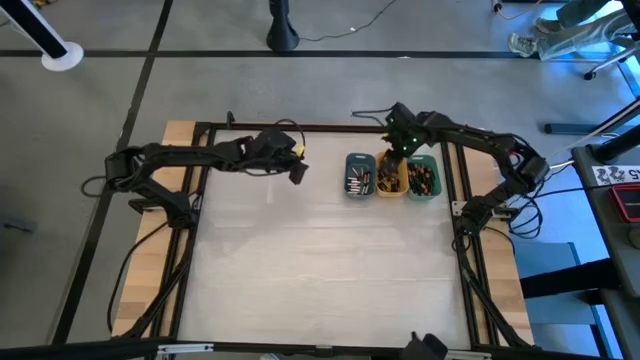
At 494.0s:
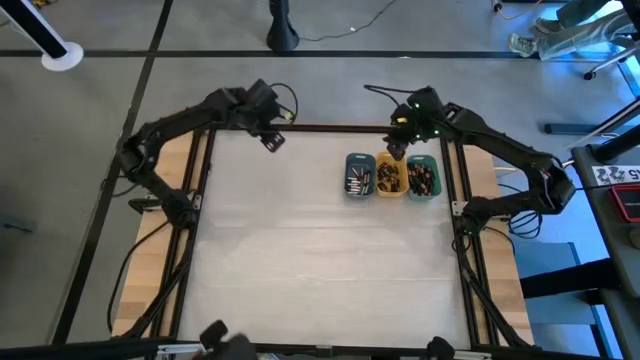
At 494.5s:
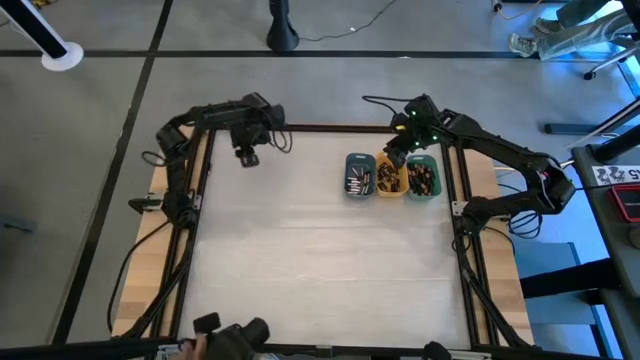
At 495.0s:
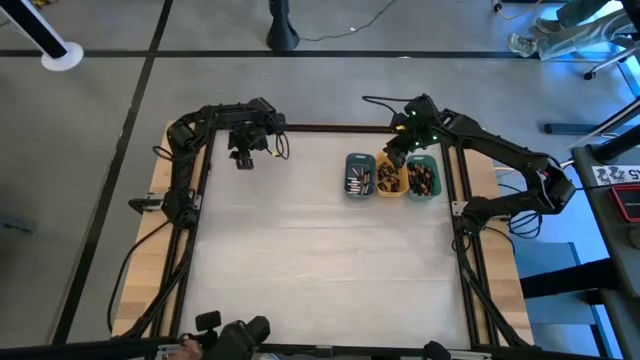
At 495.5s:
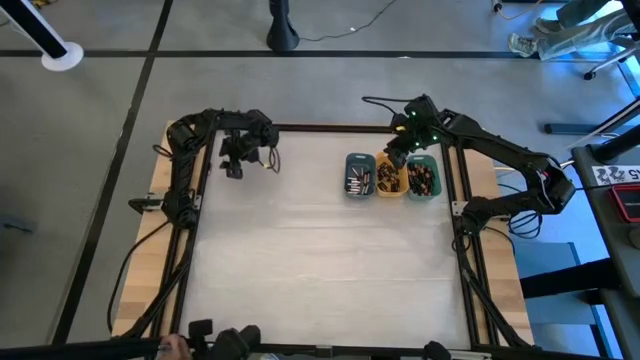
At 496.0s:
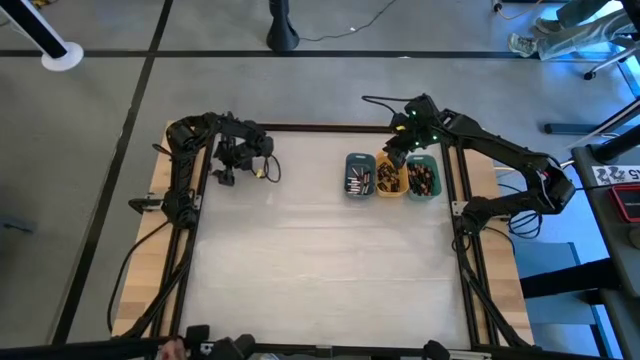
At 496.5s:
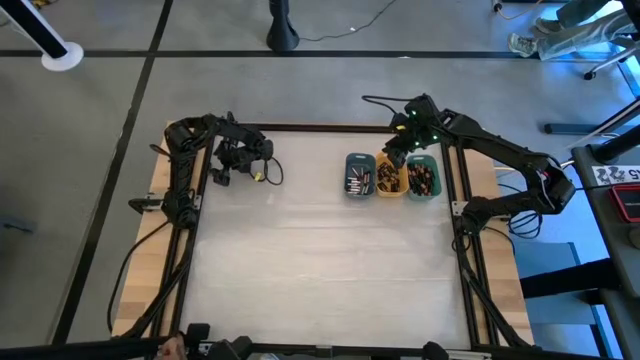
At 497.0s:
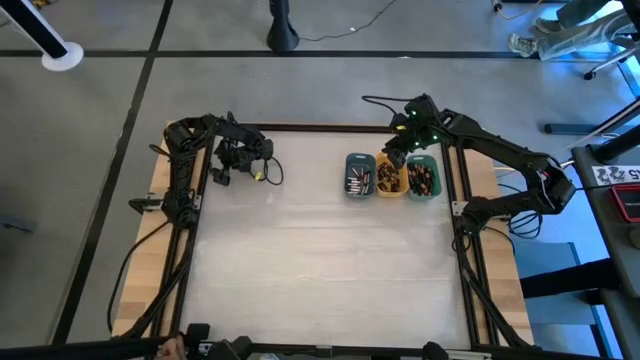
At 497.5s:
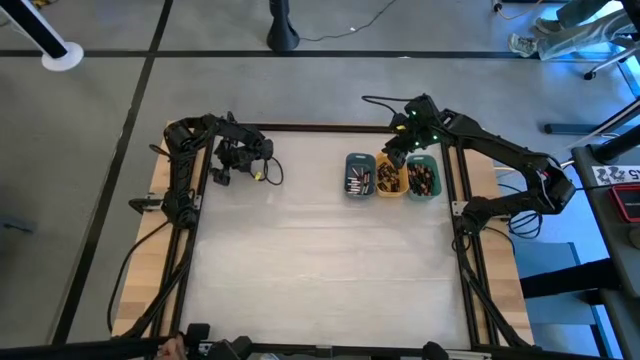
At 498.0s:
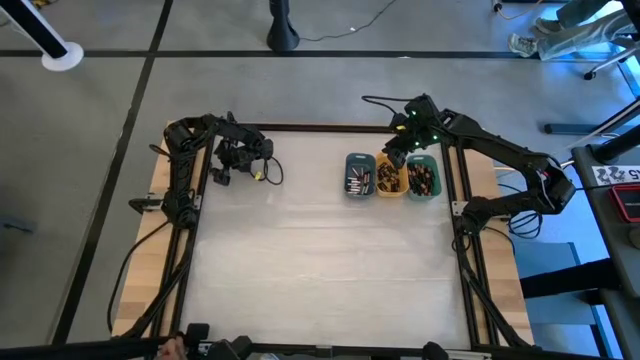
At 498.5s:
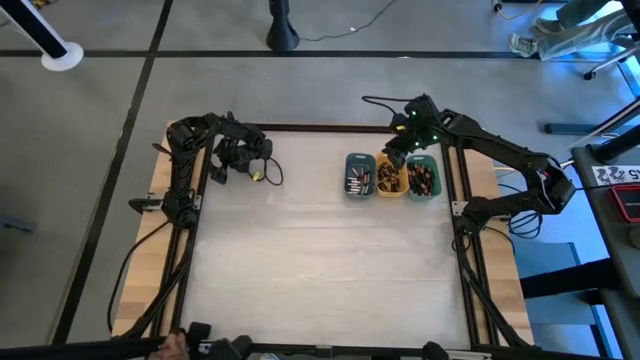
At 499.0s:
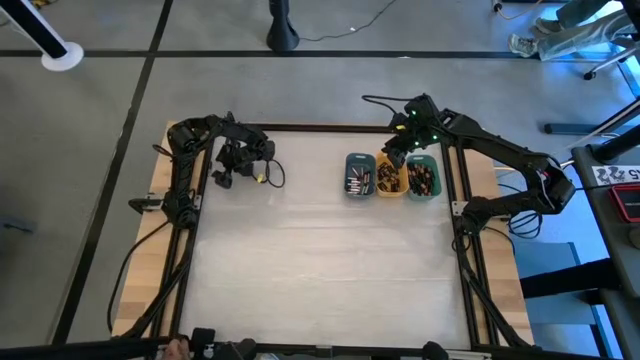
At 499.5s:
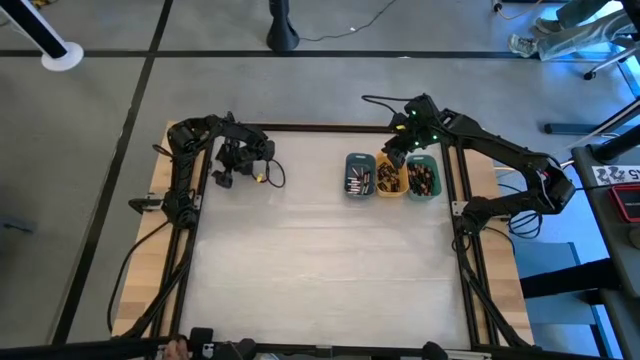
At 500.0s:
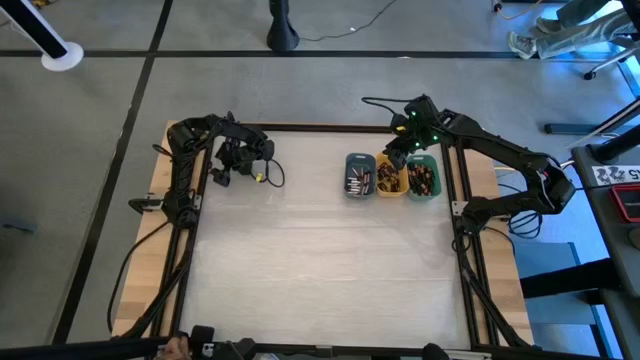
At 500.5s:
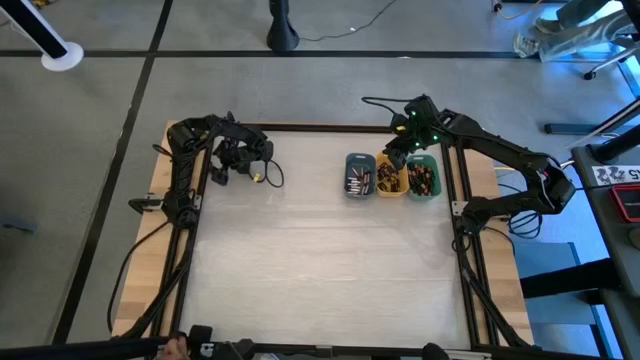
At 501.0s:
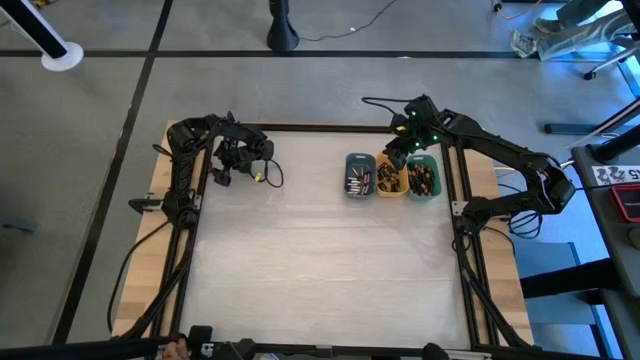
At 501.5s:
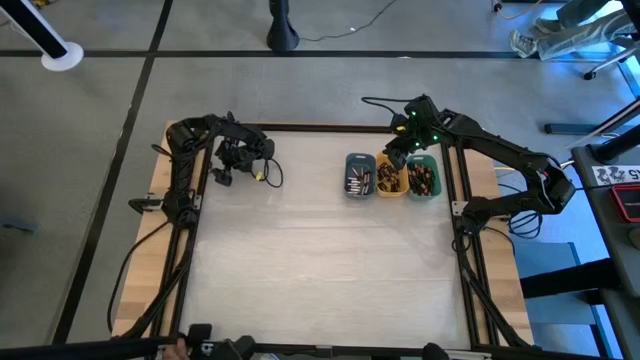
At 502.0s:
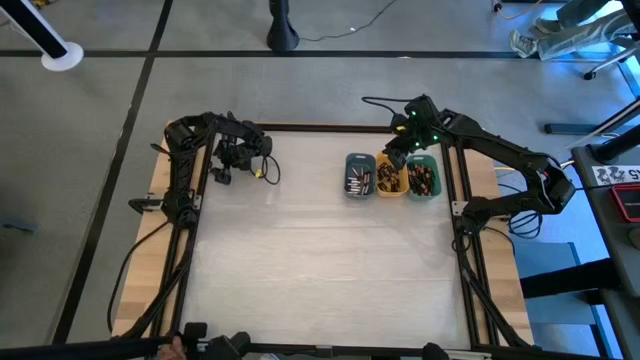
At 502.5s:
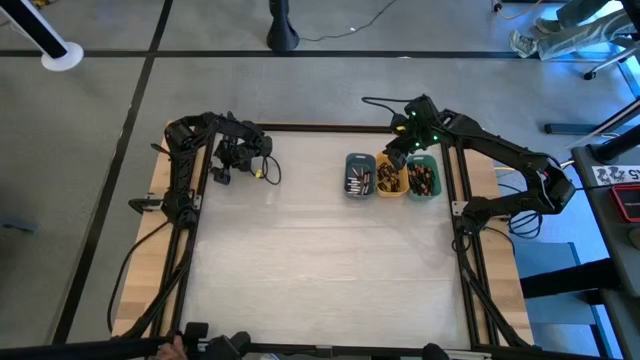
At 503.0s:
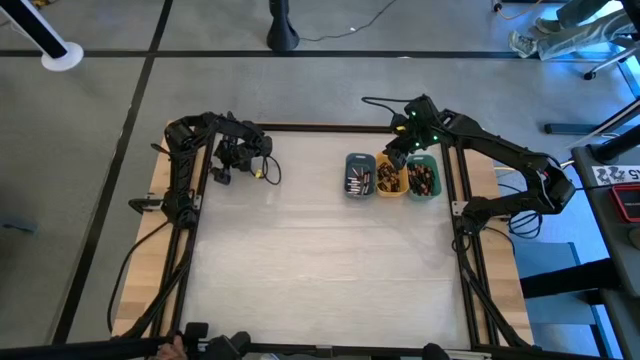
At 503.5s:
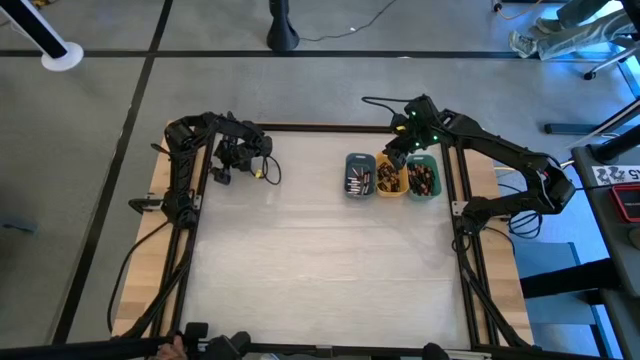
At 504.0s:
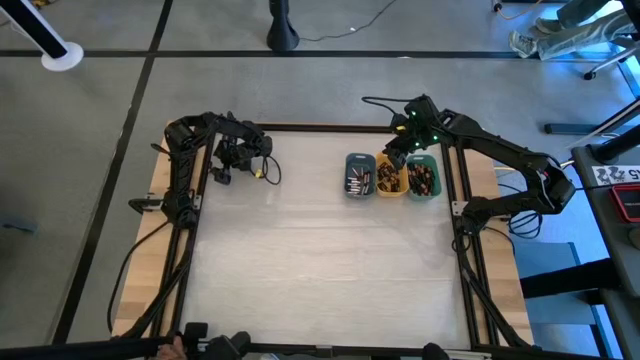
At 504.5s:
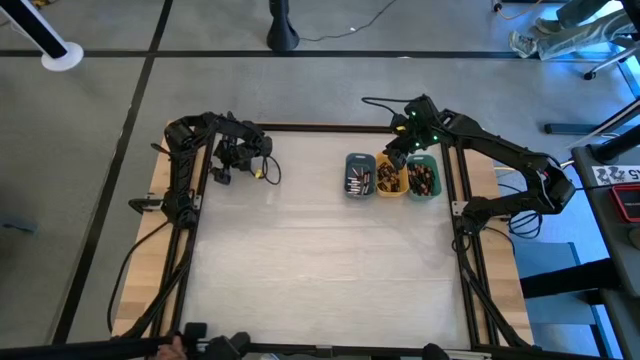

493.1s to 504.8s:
Task: Sort batteries
Put the black battery into the yellow bin

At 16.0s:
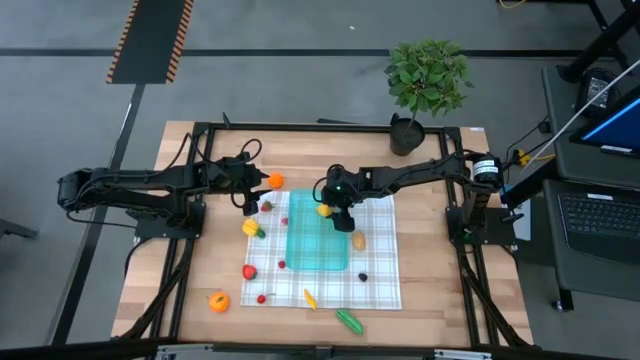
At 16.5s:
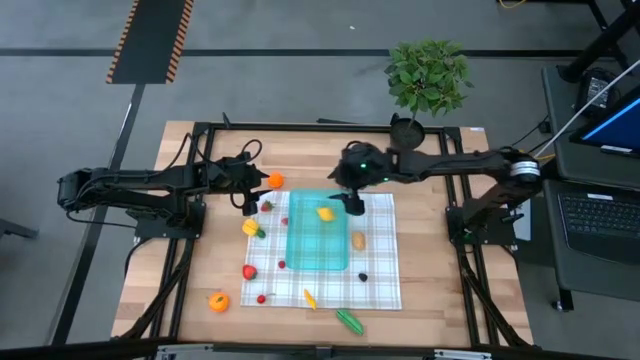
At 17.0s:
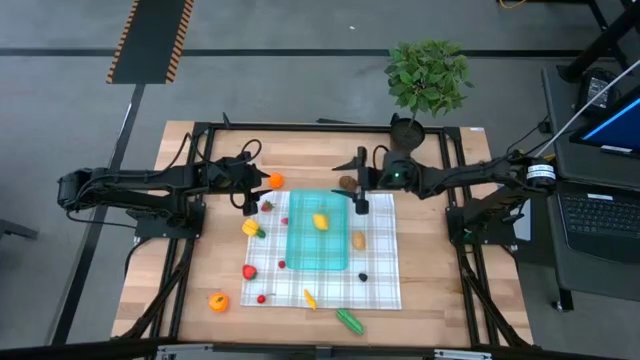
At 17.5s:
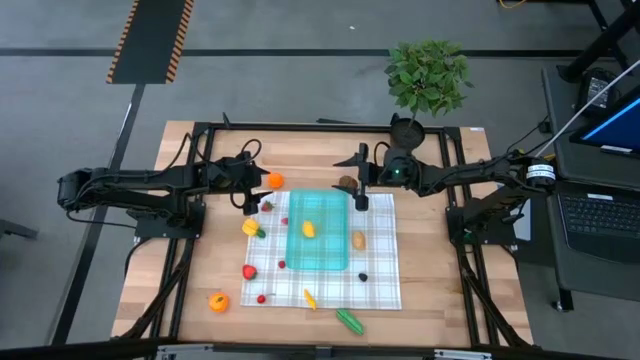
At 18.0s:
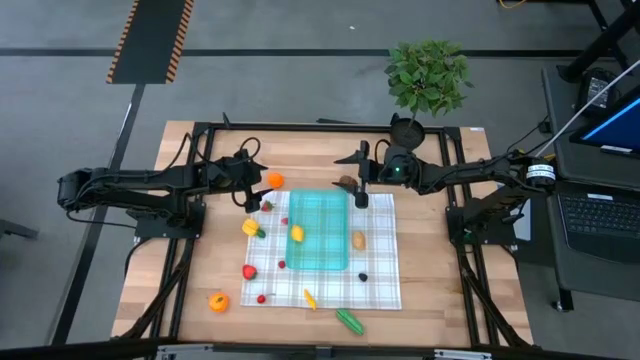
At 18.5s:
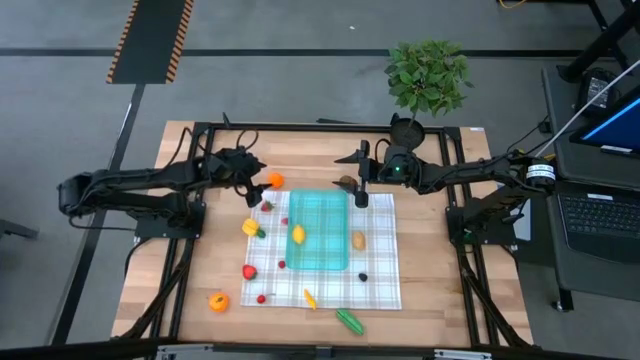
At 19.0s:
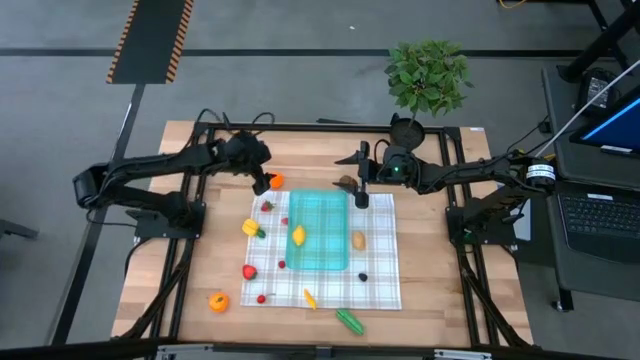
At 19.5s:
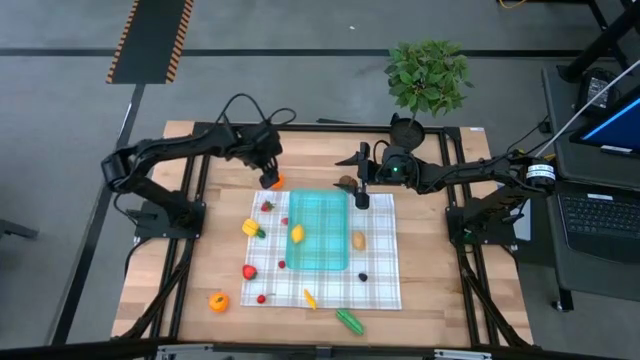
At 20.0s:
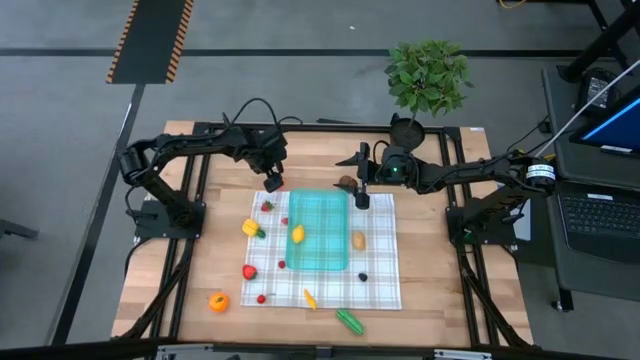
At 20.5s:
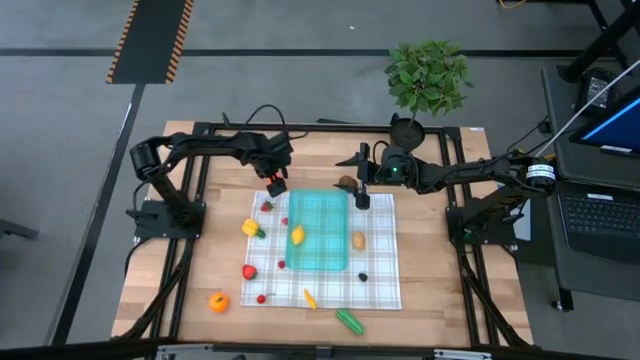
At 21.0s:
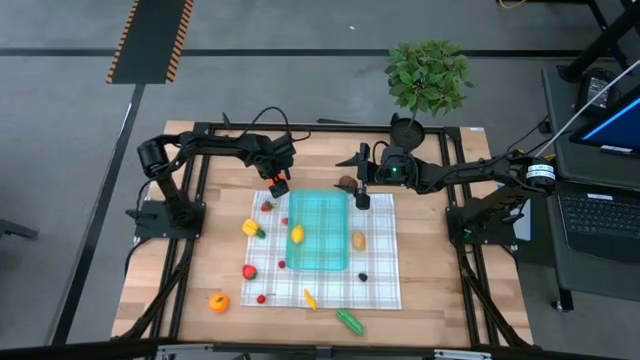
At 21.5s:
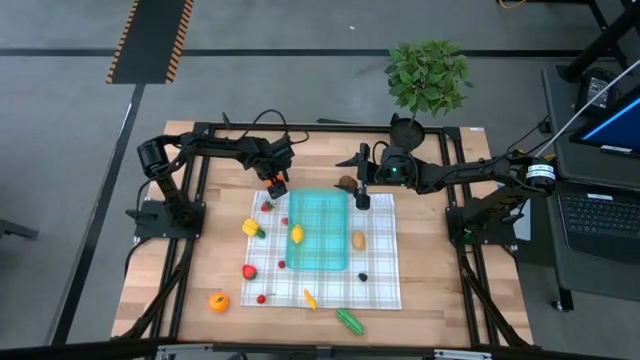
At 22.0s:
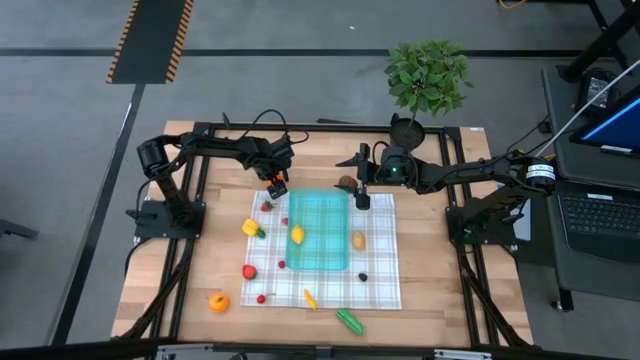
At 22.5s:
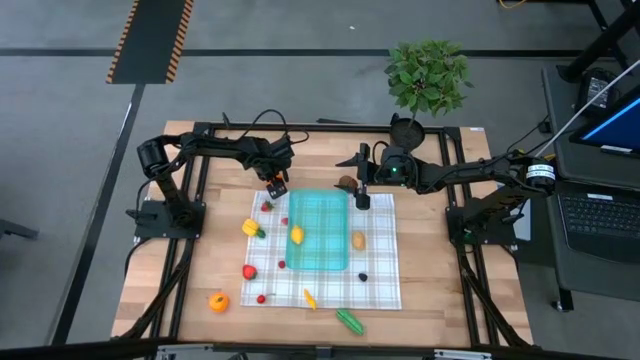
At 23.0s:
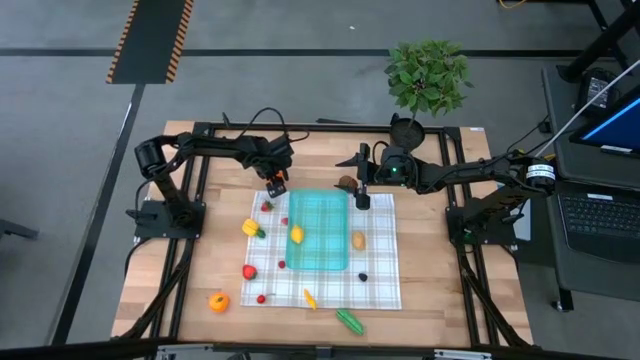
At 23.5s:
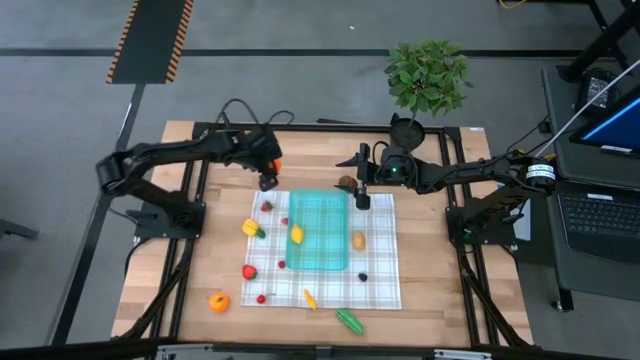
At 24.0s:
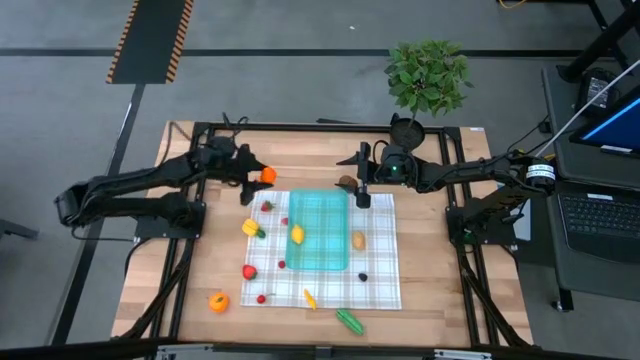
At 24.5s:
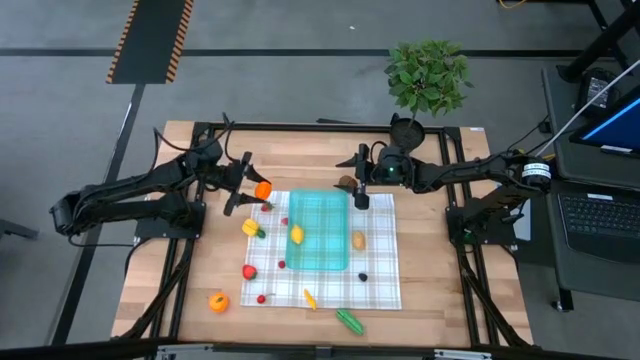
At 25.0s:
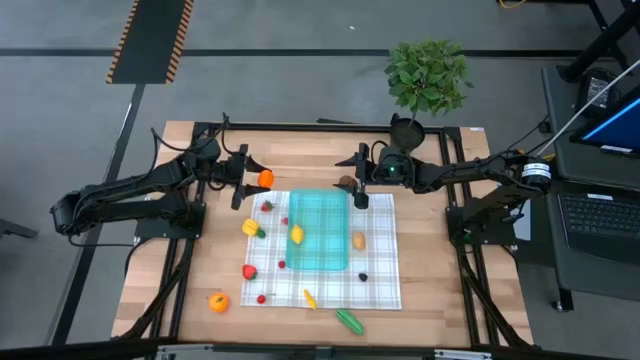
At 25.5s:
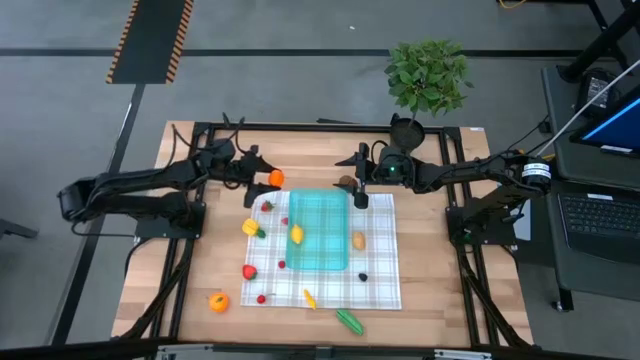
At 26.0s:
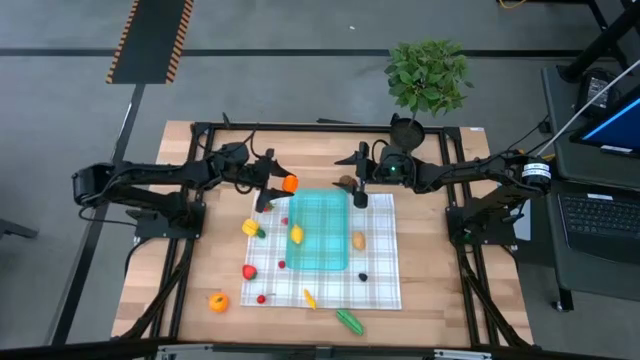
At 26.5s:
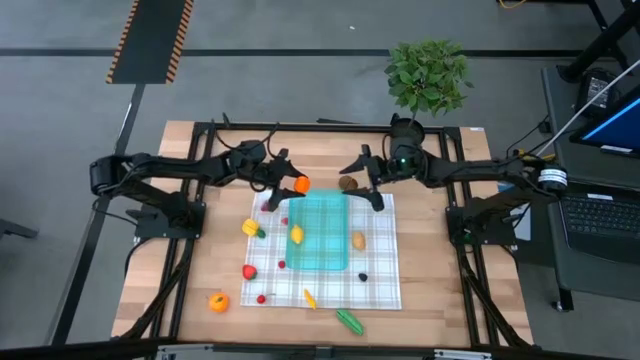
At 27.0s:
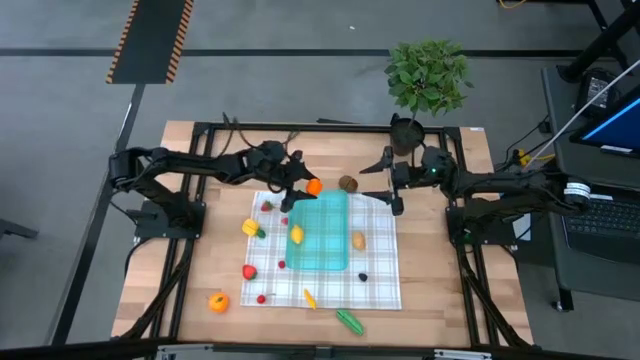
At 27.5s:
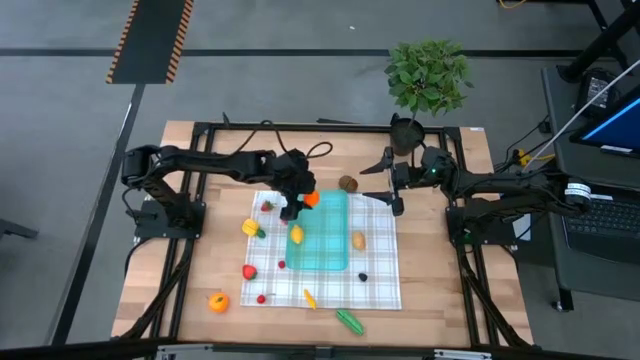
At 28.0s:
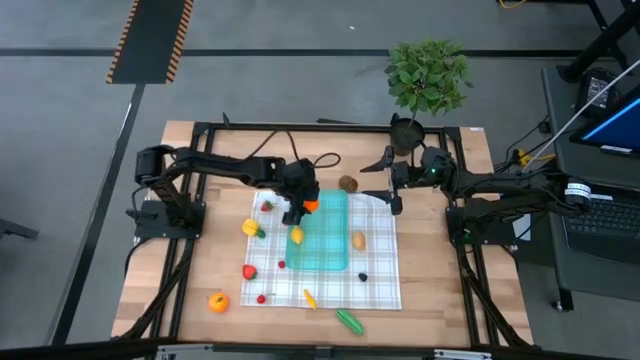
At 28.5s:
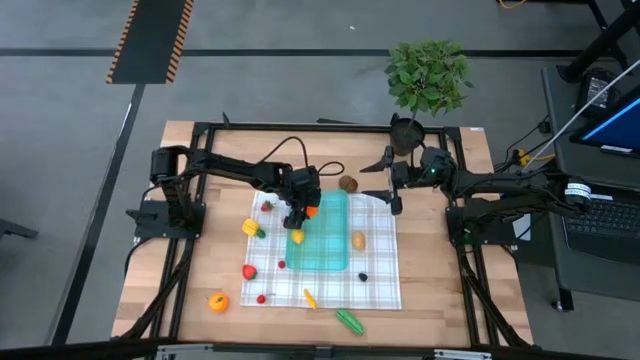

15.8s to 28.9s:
Task: Pick and placing Produce into tupperware
Put the orange pumpkin into the blue bin
